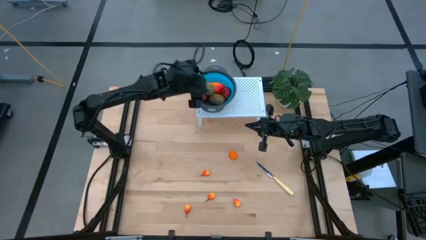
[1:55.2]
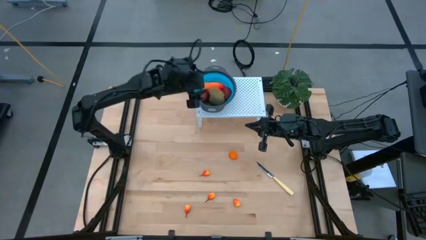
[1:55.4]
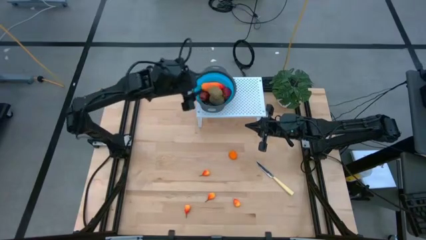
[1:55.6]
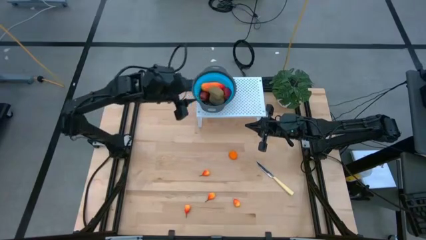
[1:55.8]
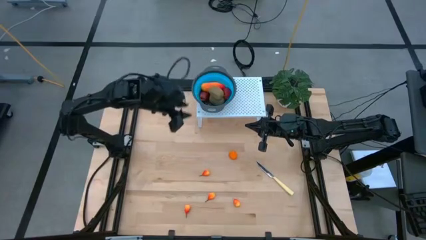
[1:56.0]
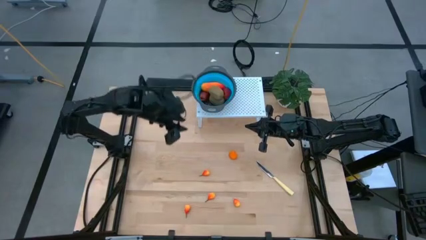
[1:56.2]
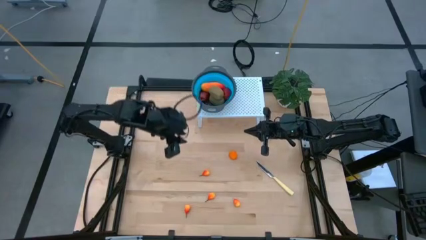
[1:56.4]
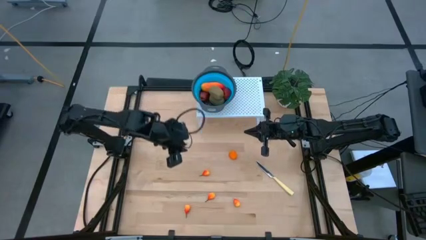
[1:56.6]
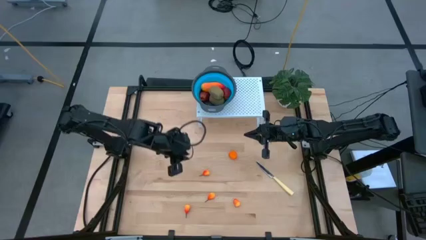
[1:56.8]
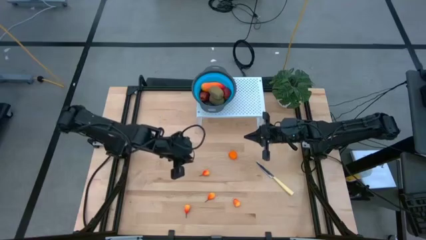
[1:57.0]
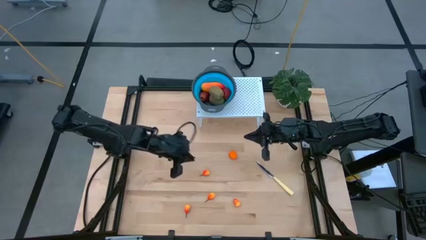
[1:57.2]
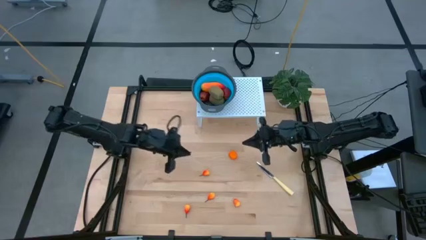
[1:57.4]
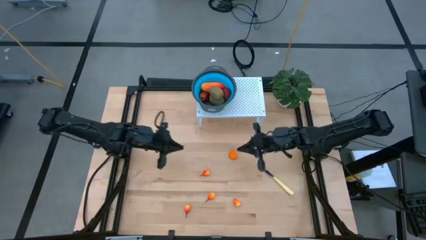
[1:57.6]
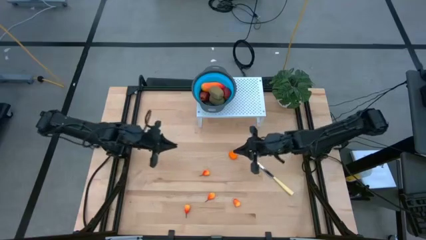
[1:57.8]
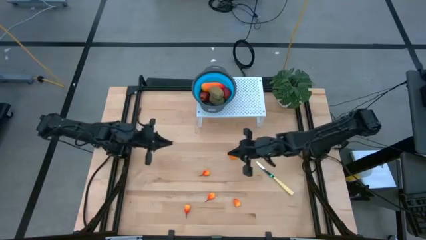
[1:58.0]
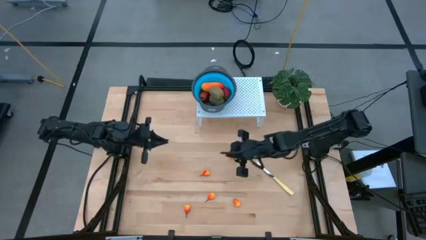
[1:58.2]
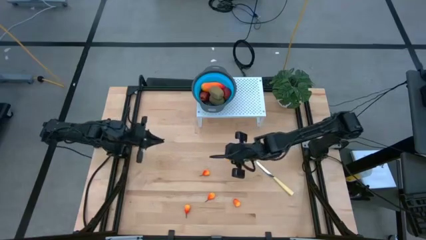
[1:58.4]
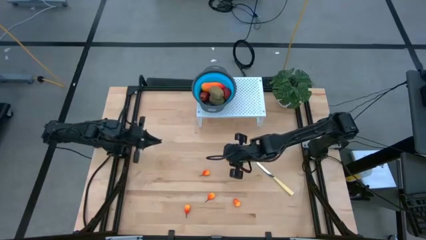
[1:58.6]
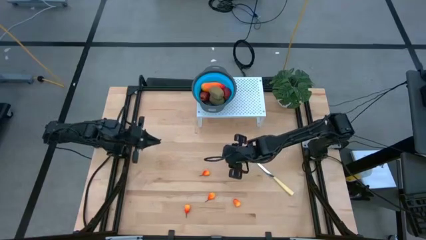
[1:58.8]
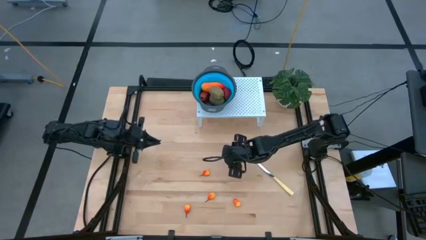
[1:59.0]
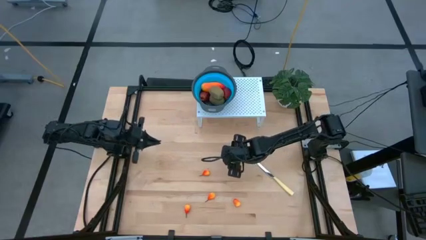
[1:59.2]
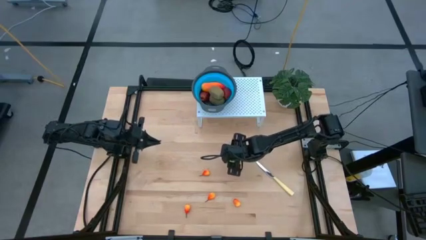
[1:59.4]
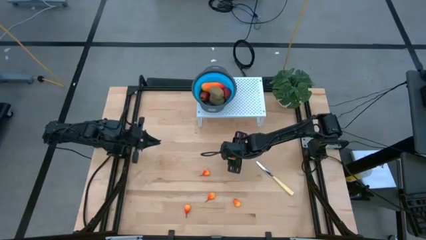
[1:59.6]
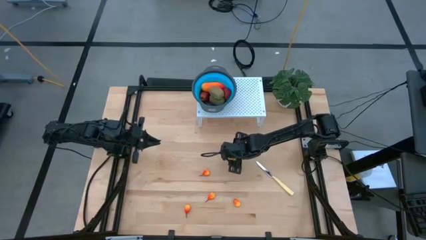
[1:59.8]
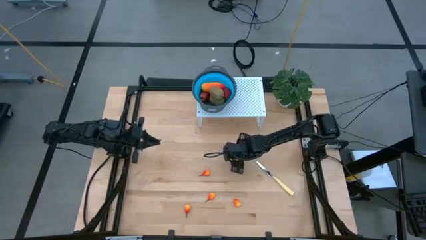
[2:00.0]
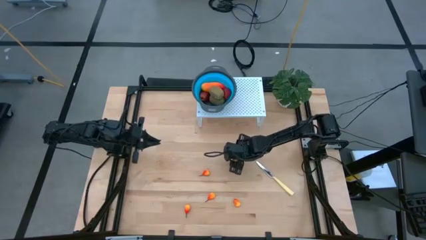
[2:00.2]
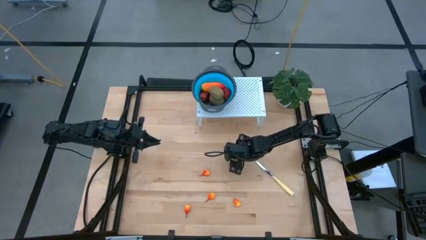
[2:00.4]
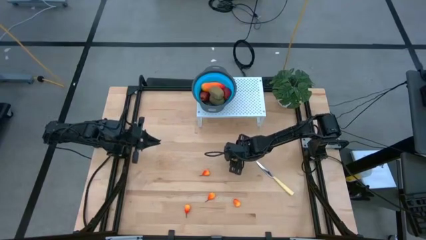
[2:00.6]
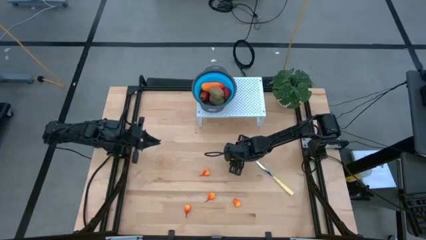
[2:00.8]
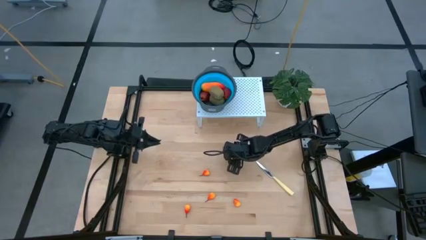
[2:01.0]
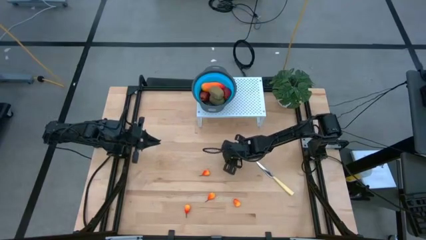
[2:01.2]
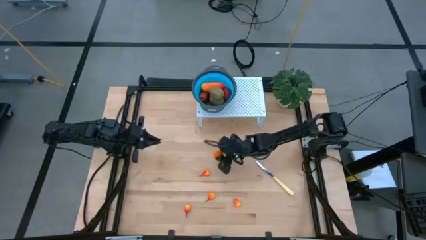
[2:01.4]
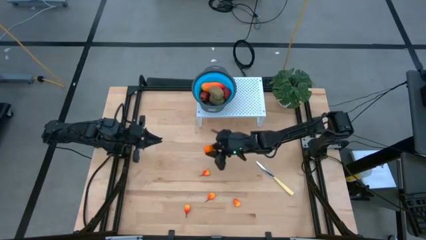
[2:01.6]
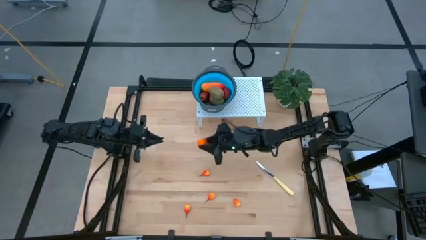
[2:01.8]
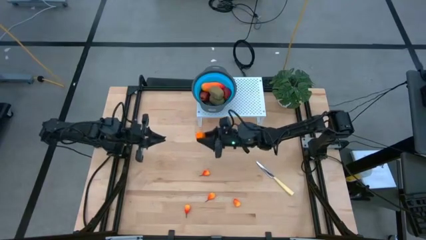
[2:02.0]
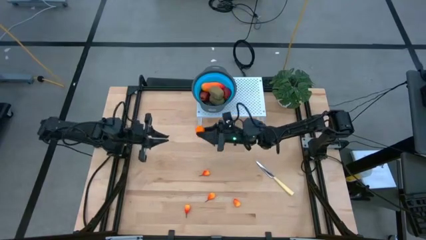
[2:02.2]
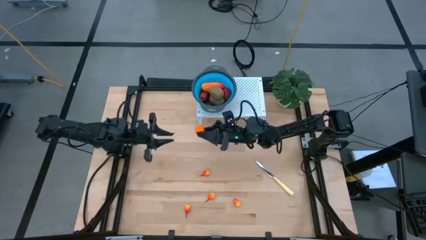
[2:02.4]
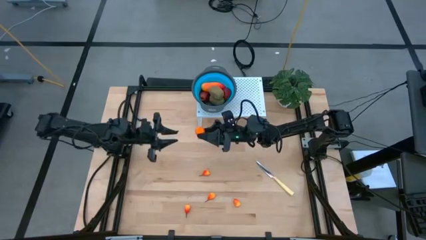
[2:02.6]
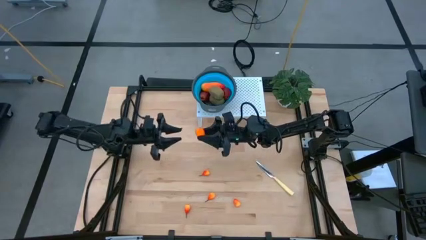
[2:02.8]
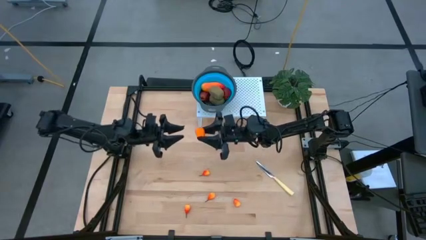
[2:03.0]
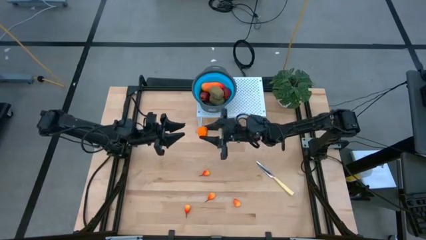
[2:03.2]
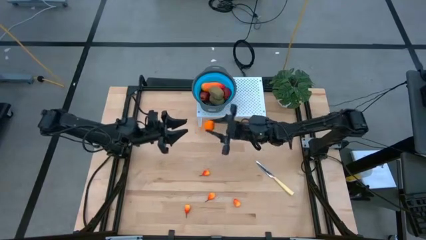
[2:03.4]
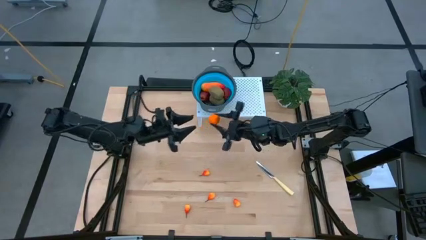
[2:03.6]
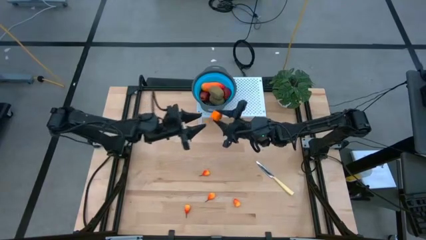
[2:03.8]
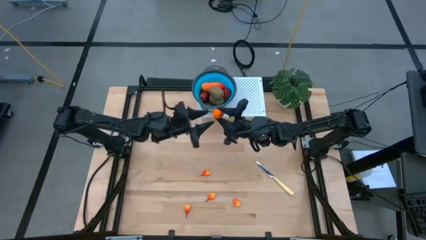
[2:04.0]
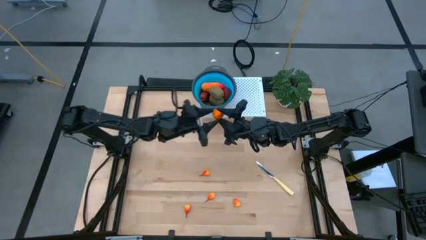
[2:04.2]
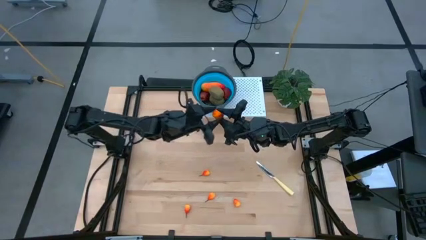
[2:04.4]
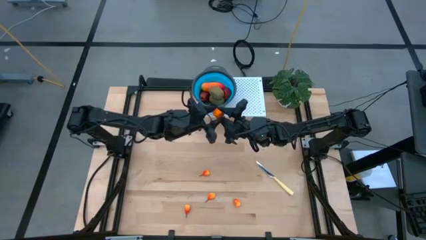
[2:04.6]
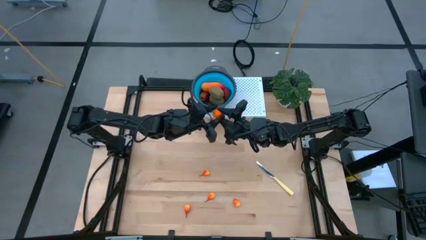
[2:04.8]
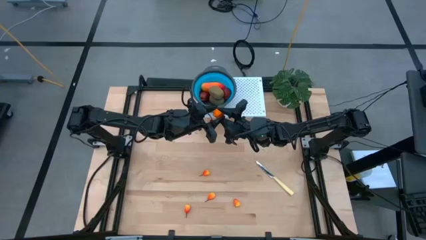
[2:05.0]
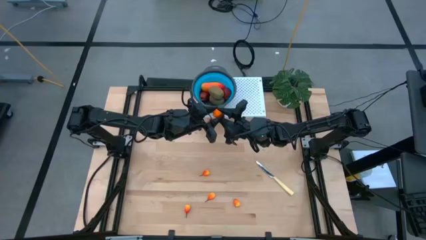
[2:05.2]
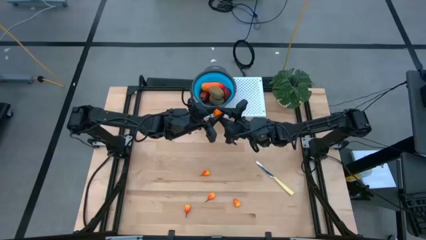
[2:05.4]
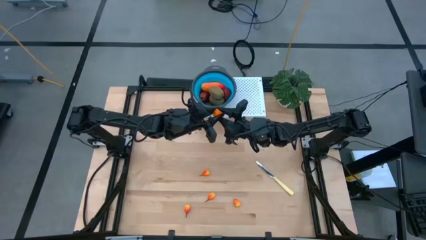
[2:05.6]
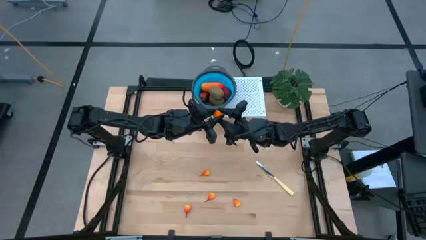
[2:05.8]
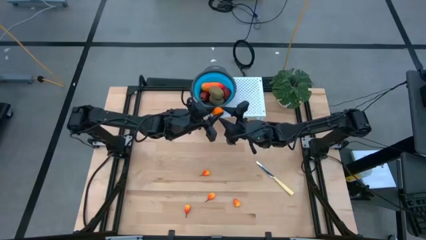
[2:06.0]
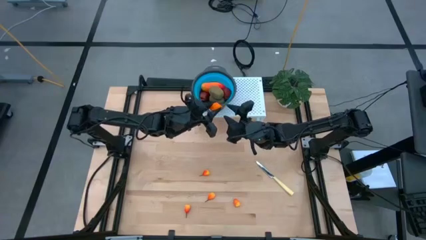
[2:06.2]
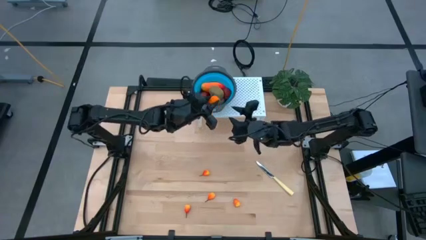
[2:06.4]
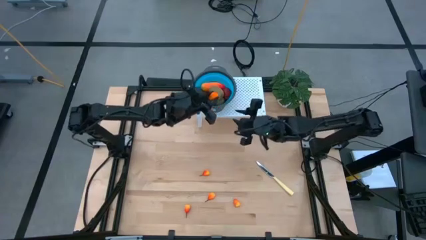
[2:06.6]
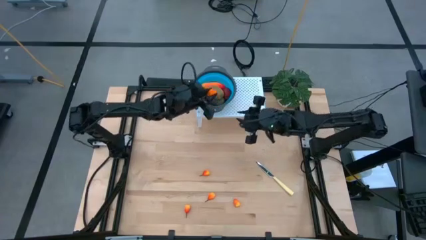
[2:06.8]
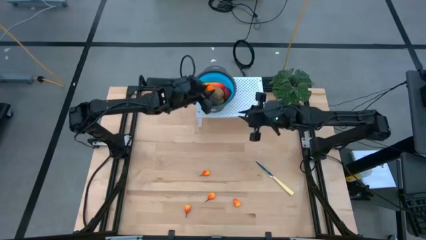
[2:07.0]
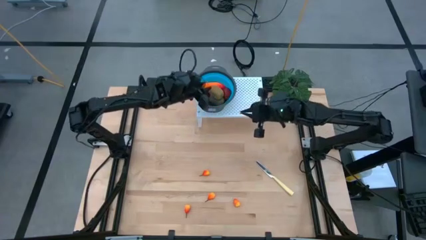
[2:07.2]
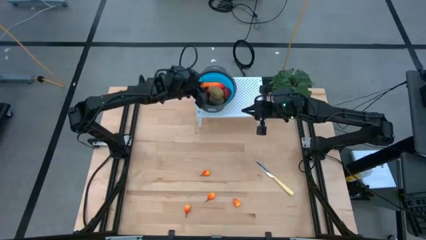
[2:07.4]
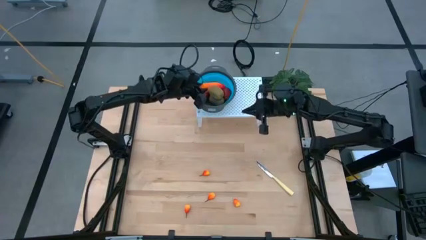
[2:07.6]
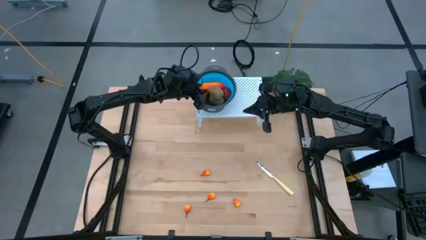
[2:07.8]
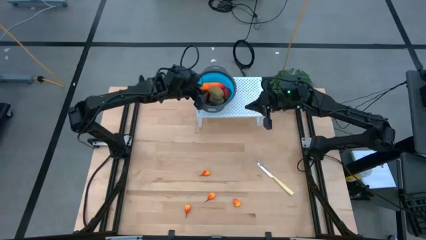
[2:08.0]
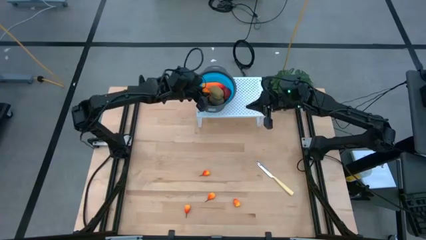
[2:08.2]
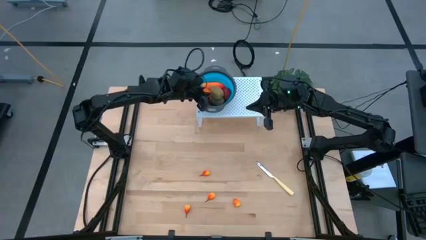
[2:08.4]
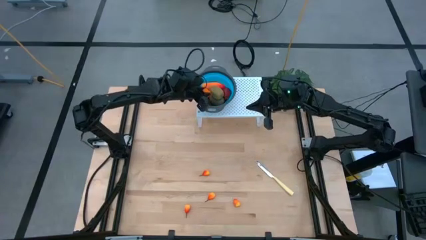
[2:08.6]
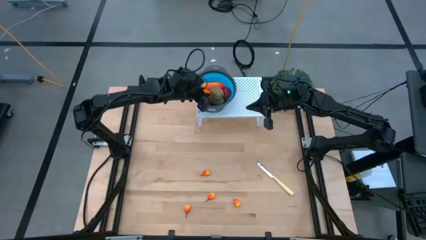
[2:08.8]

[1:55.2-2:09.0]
Task: Pick & Place Fruit
Put the orange into the blue strainer bowl on the shelf

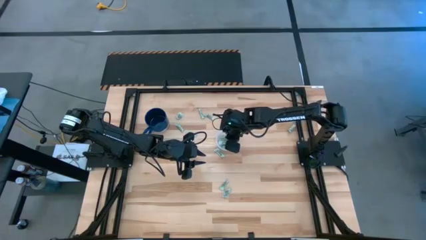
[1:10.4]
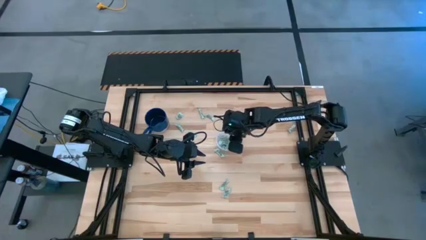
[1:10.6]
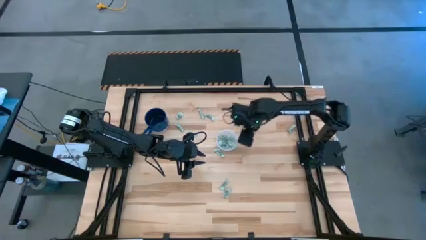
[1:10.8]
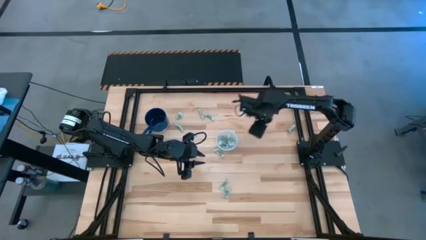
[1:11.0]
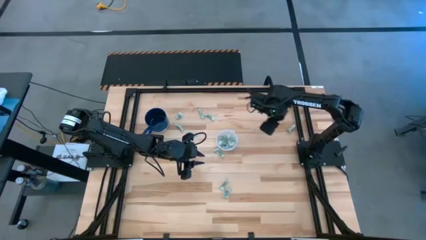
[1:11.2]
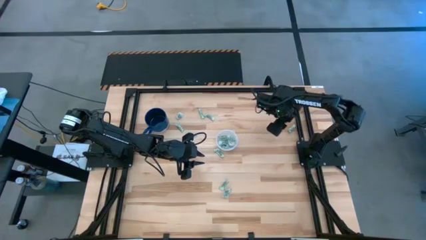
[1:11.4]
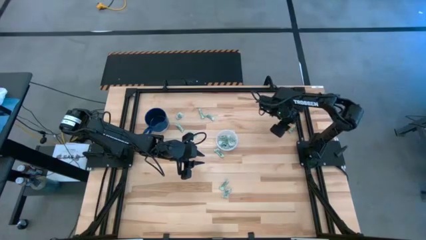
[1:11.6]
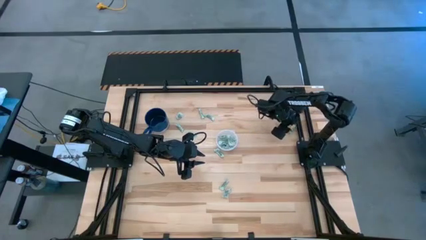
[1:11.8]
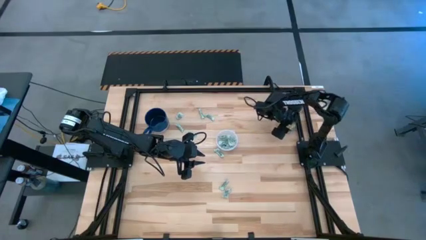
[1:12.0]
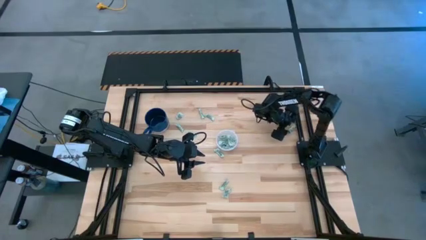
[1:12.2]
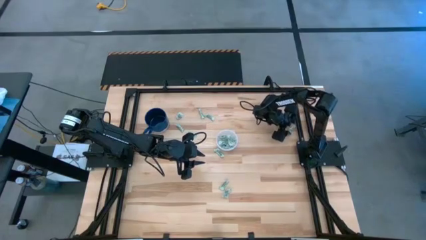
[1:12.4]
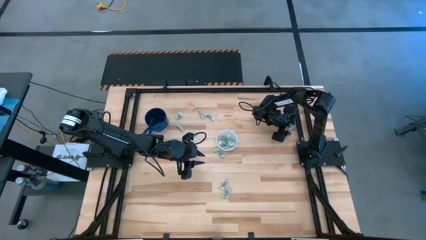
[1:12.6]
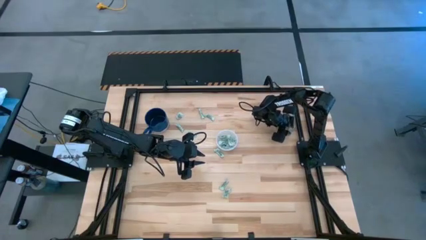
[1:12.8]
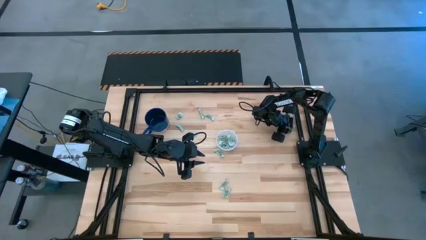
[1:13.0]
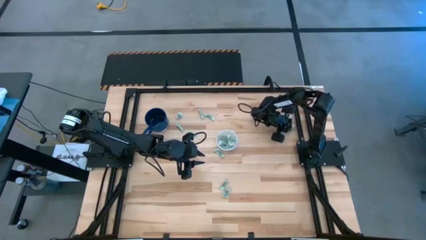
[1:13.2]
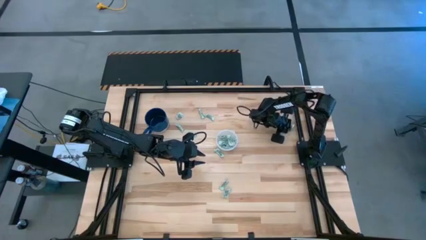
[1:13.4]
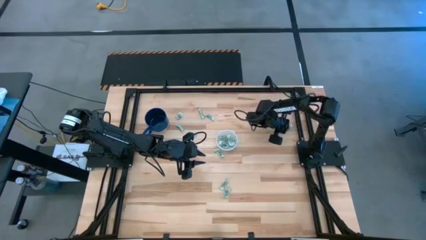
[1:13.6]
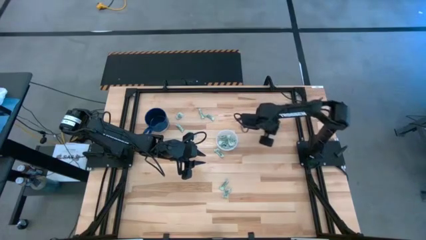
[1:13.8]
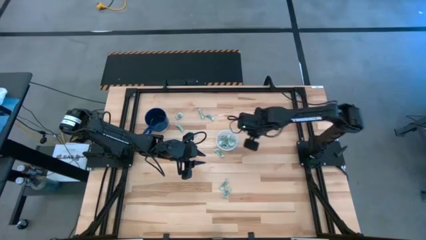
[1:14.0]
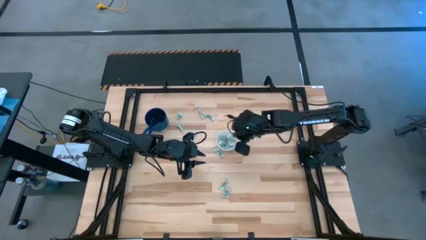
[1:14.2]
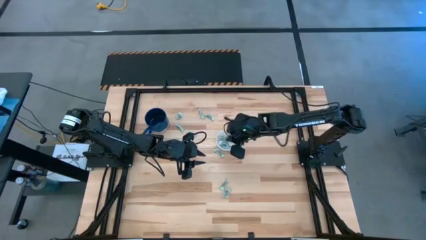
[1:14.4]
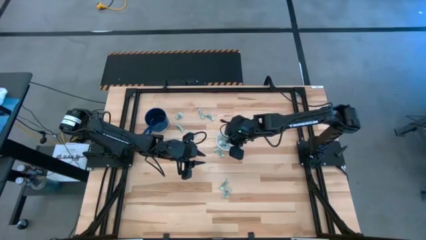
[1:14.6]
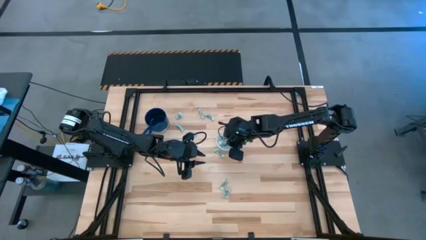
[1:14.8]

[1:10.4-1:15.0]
Task: Pick and place items into bin
Put the gray stevia packet into the transparent bin
